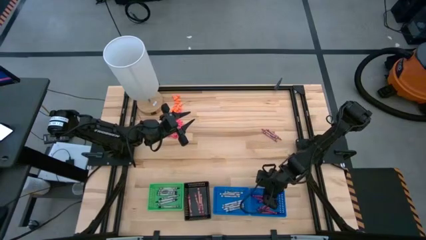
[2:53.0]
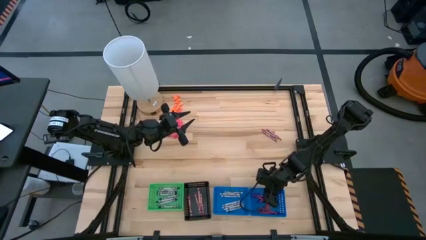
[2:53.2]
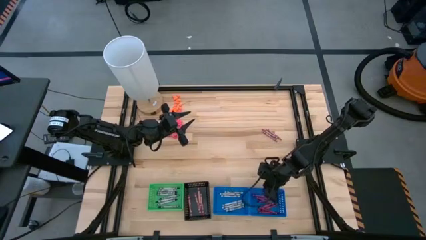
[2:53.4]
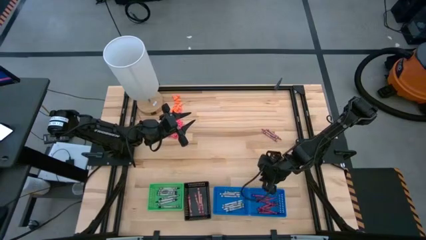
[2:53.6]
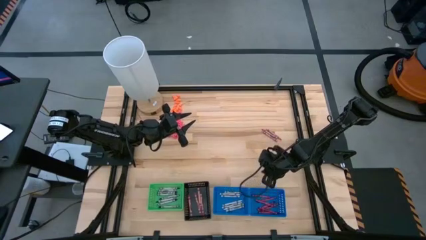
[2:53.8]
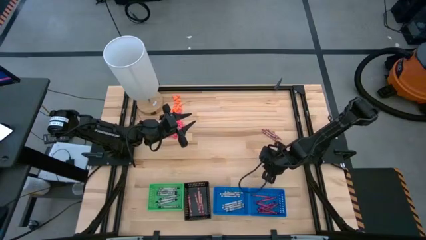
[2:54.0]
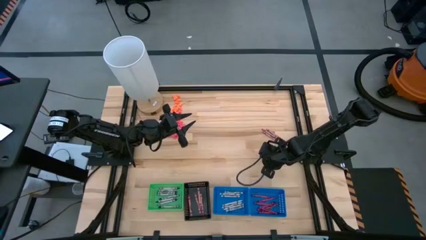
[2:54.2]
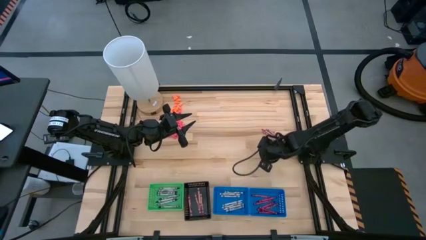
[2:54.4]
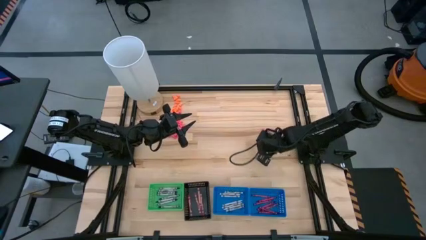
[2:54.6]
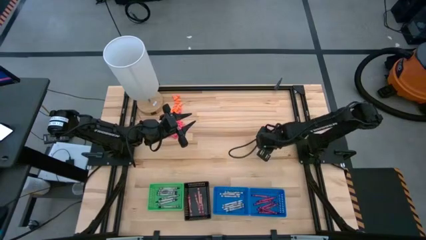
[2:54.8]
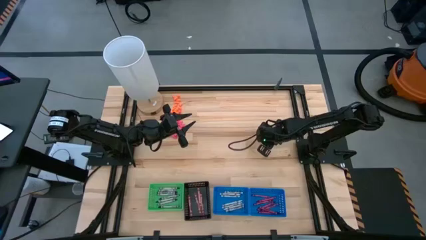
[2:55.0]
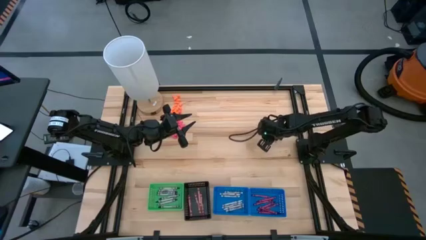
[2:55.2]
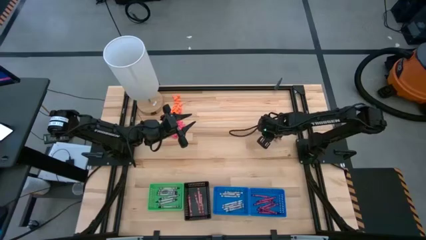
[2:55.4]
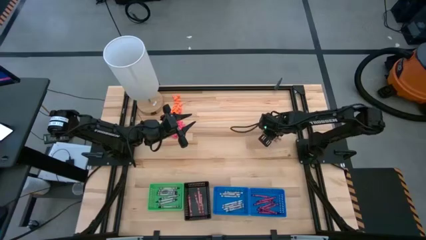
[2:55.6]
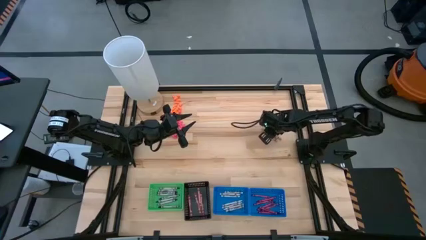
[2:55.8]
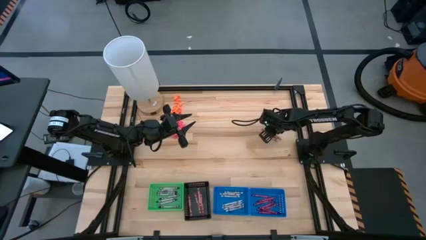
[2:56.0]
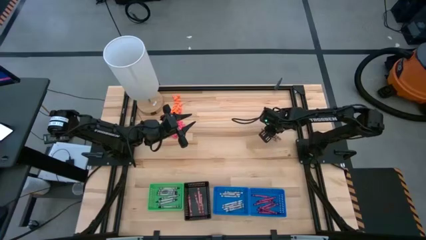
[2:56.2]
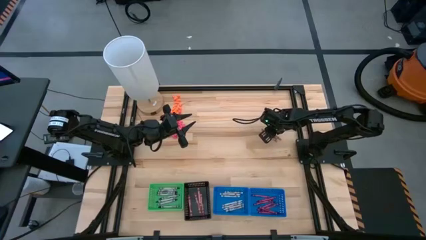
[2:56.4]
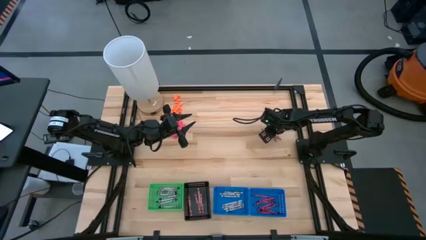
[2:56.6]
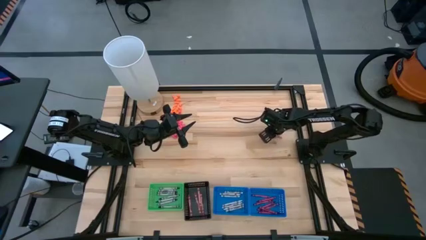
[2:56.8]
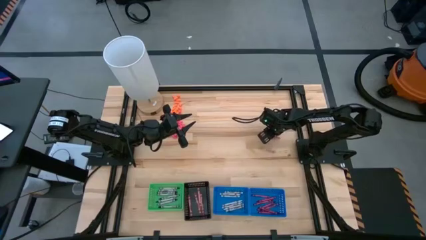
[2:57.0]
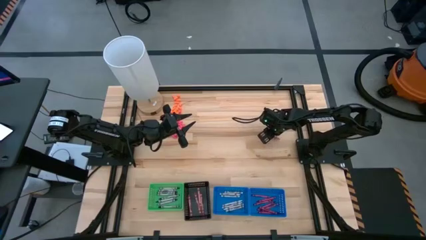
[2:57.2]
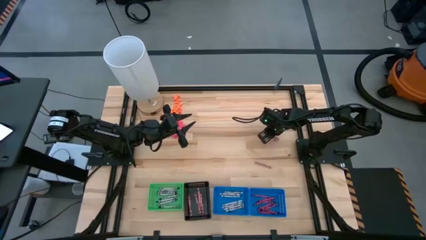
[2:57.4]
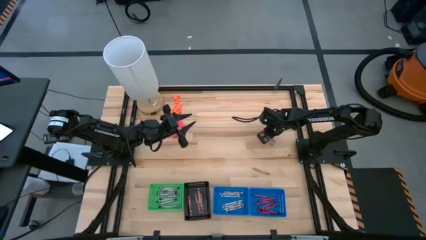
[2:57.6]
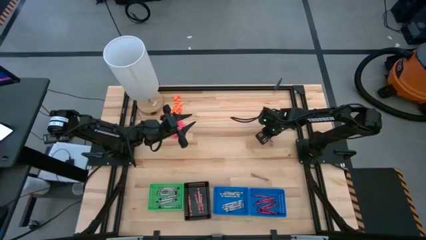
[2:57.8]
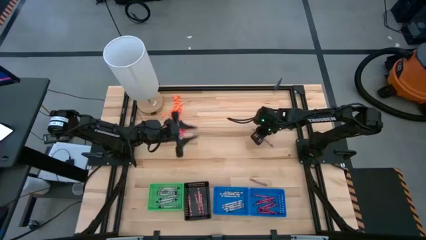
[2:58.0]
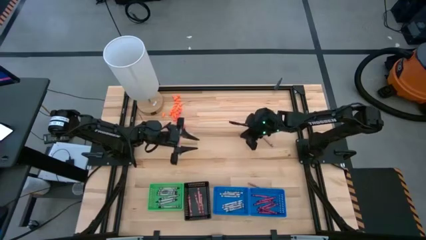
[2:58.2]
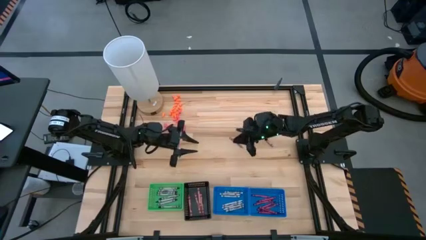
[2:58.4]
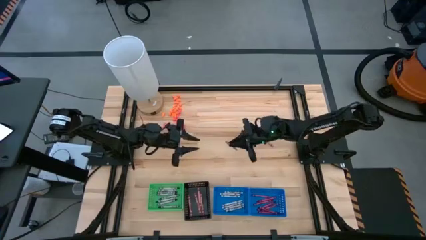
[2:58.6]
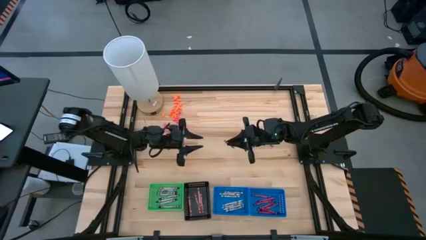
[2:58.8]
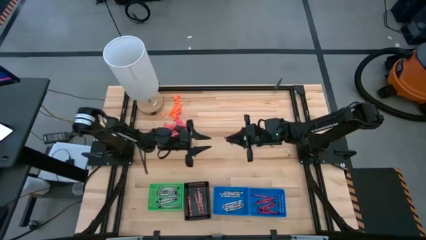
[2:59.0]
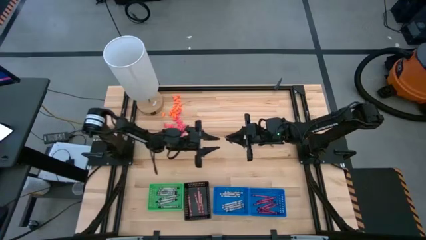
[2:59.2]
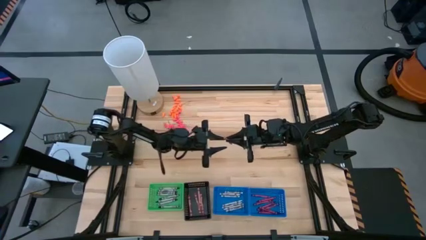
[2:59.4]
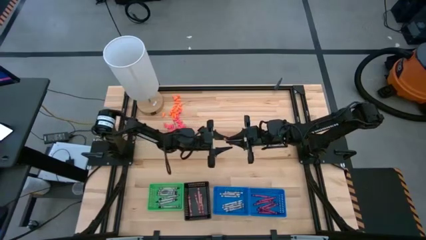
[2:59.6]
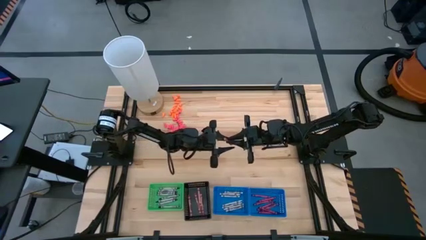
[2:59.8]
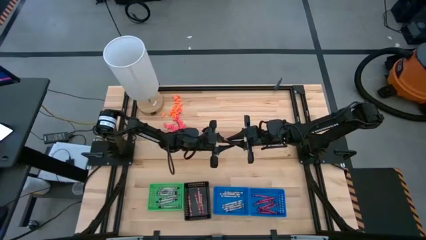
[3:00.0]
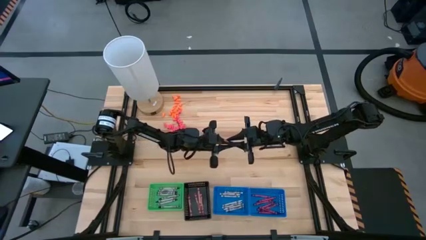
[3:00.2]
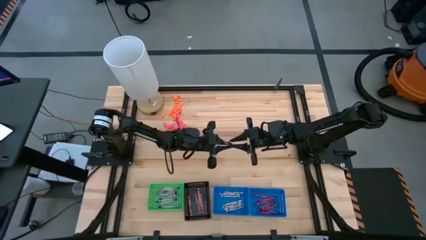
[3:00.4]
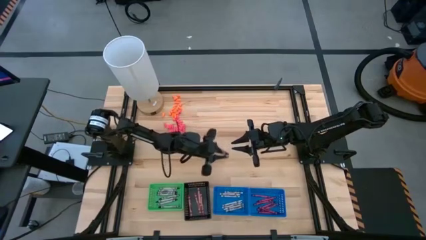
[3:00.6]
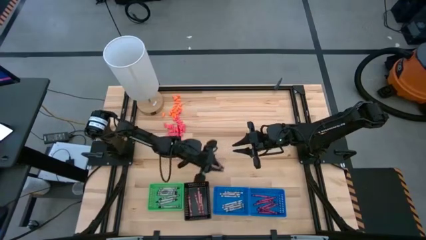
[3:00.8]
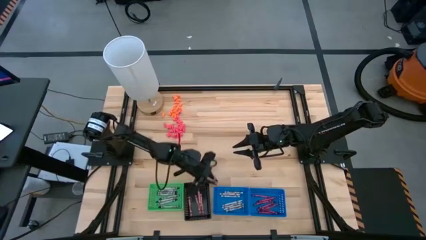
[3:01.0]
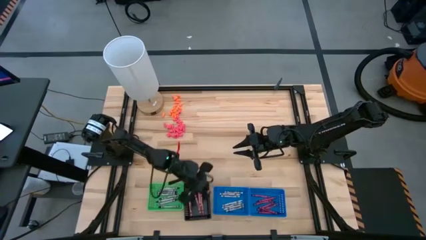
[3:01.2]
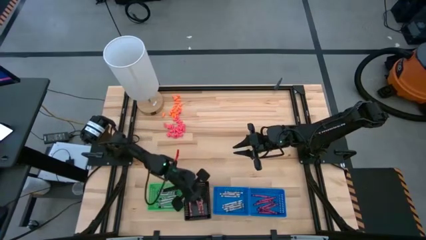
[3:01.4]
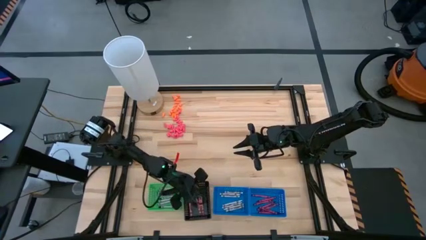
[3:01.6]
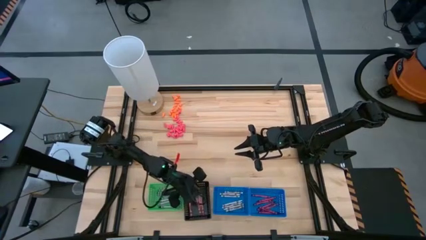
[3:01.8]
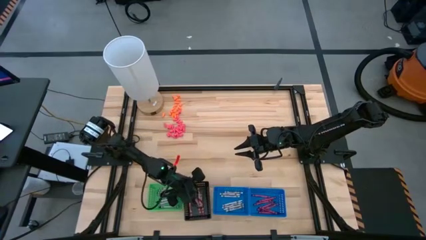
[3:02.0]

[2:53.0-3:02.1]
Task: Sort crayons
Put the pink crayon into the black bin

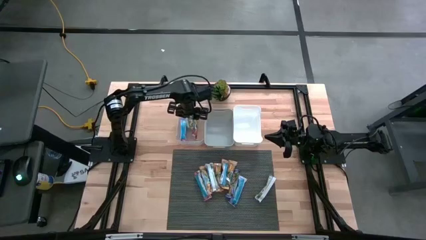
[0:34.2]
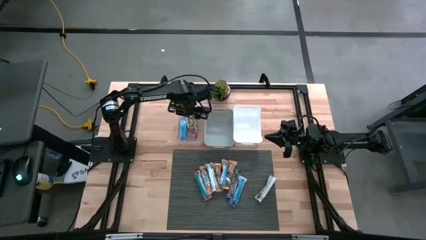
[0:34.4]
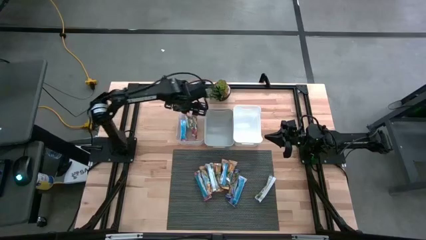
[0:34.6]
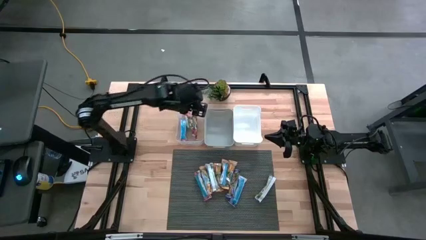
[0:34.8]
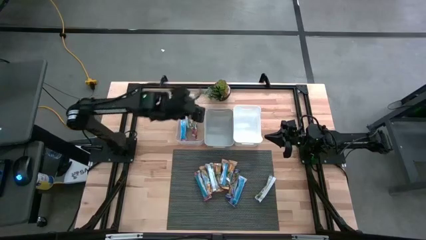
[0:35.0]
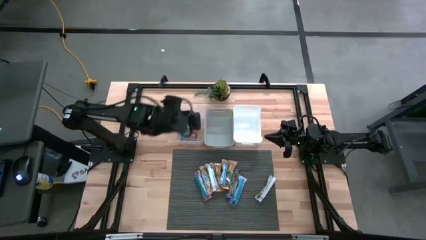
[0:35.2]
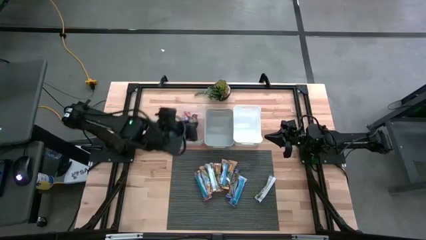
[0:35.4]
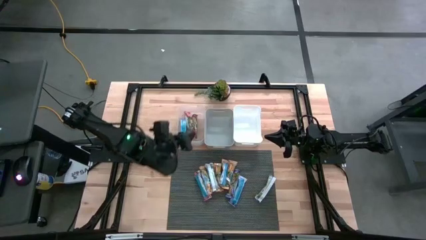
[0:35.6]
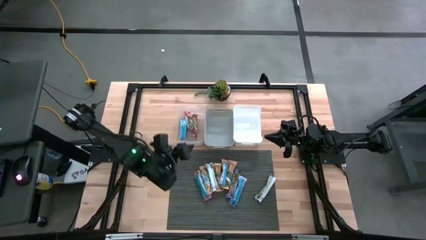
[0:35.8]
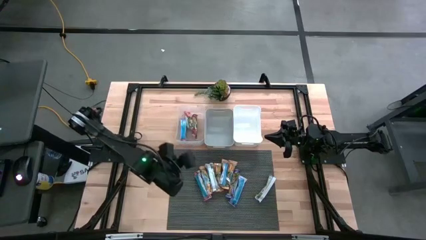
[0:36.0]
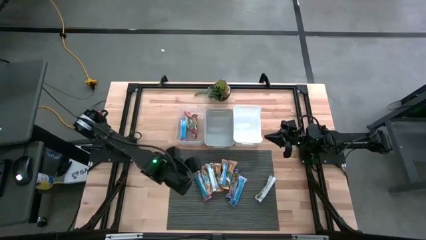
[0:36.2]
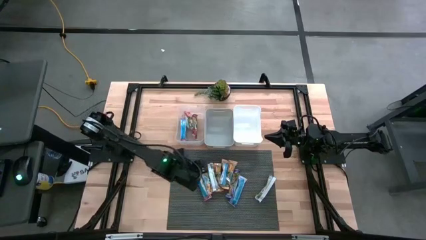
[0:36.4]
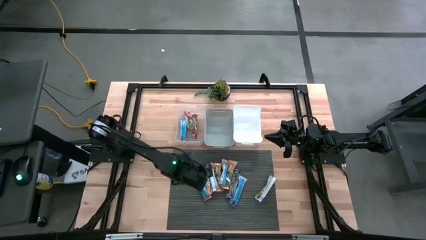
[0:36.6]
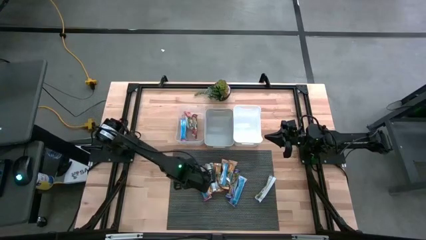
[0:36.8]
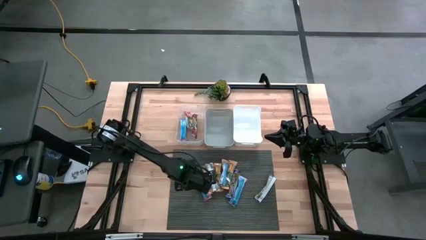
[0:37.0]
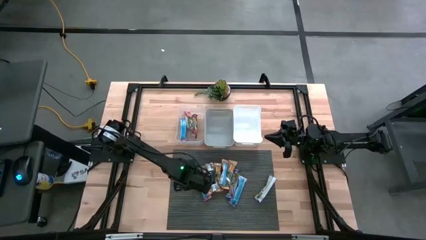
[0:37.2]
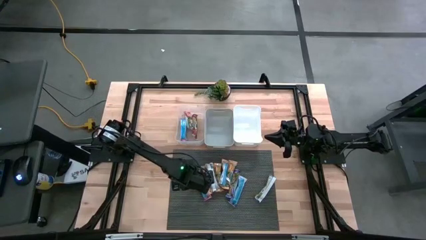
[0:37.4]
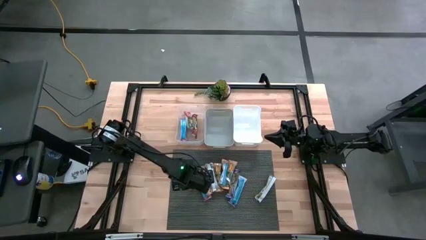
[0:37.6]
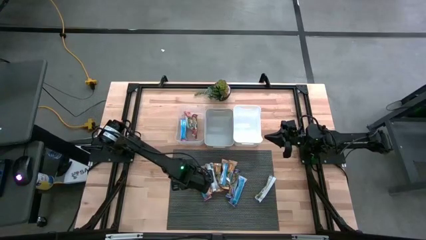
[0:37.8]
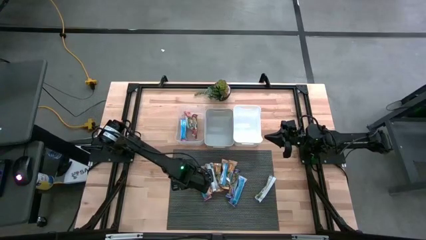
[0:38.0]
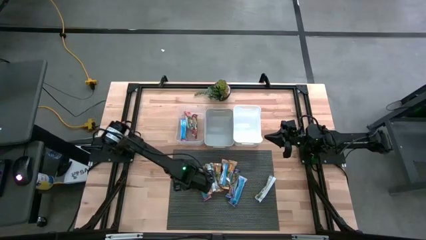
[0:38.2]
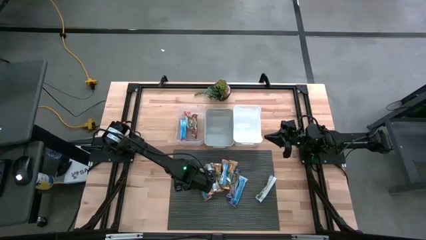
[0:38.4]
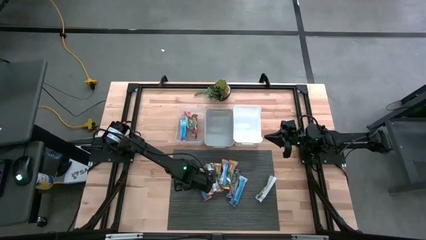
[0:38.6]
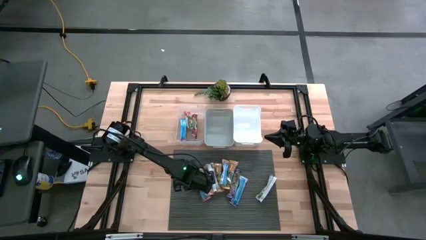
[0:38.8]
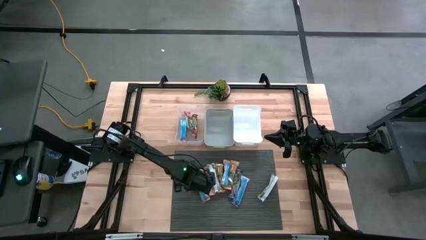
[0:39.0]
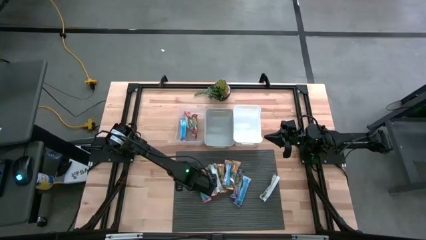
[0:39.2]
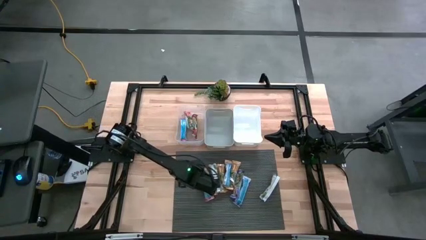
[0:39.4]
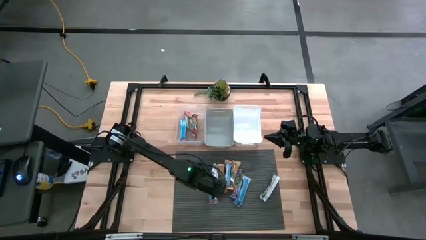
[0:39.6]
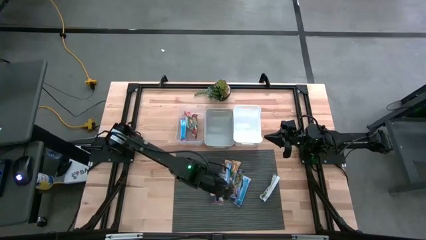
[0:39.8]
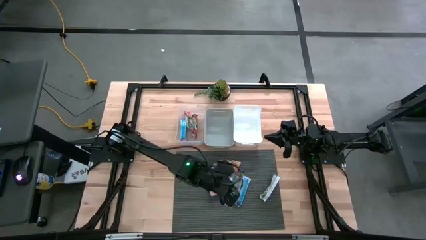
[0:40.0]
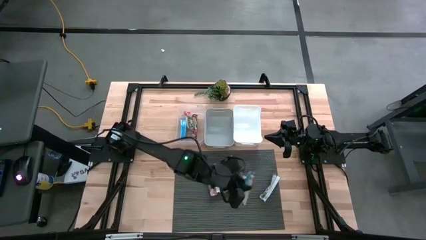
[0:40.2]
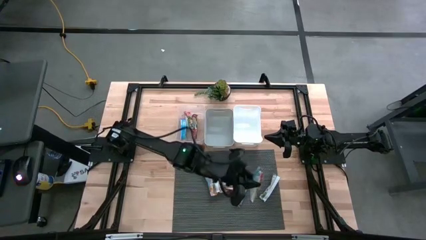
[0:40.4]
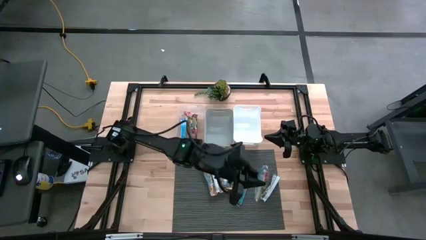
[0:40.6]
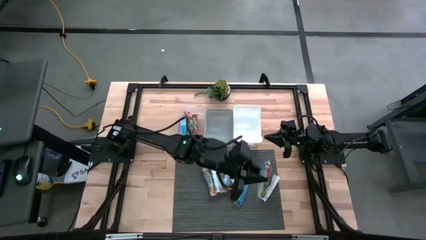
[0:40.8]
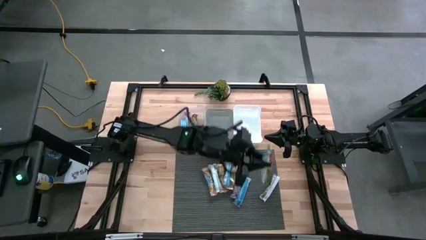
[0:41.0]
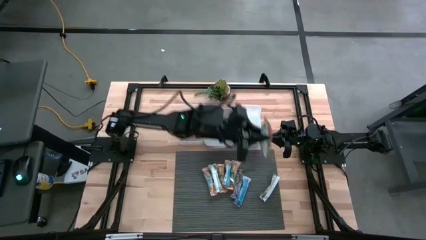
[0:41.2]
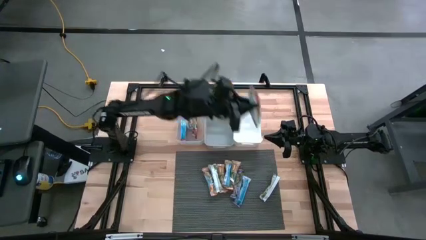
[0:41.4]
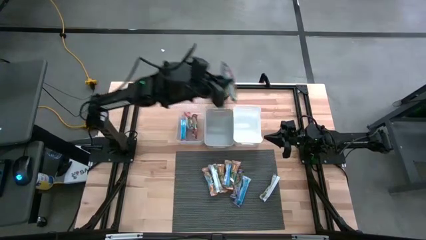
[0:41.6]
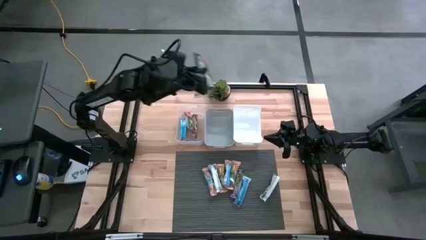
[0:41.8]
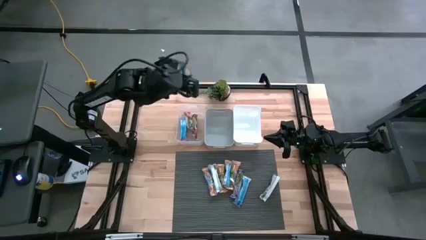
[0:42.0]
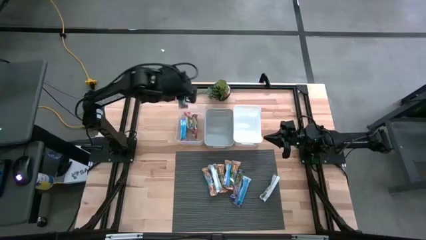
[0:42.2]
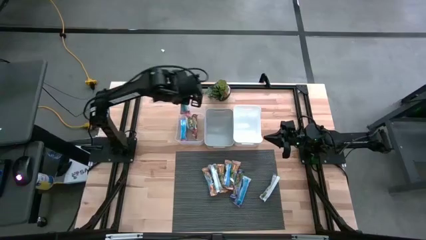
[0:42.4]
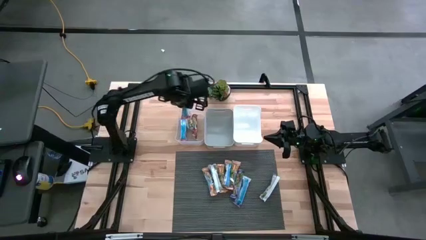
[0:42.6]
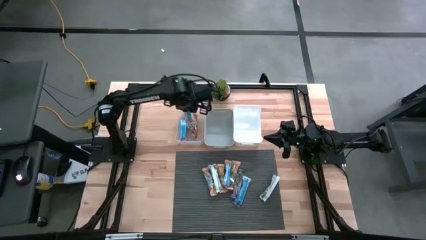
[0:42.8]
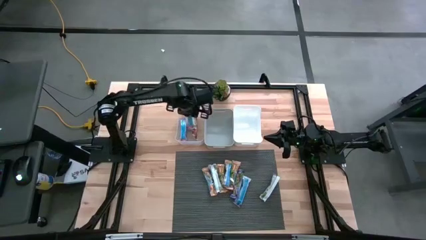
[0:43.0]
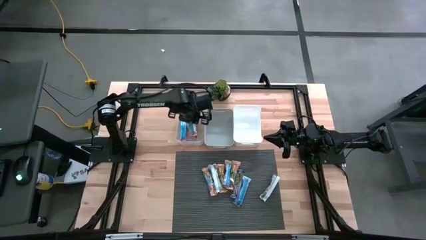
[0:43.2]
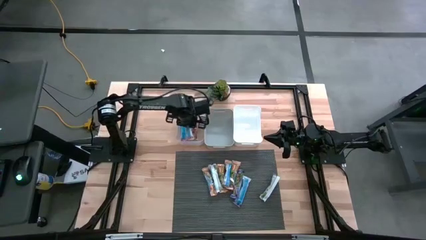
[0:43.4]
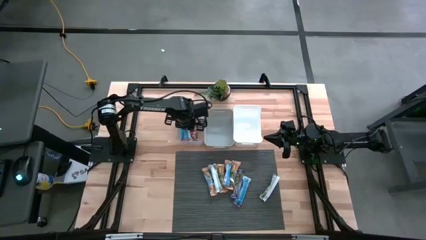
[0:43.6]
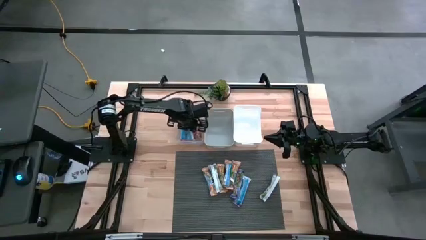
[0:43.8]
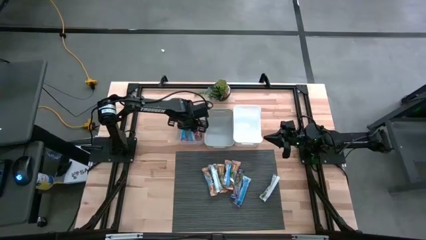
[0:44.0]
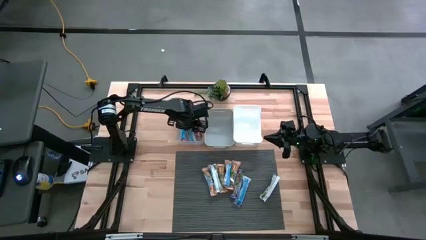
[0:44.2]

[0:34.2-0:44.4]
Task: Pick and place Granola Bars by type
Put the red granola bar into the transparent bin
